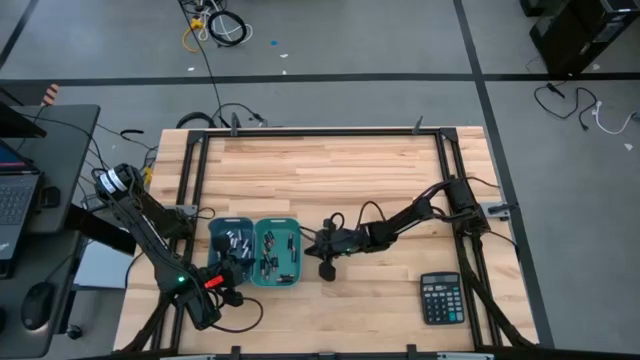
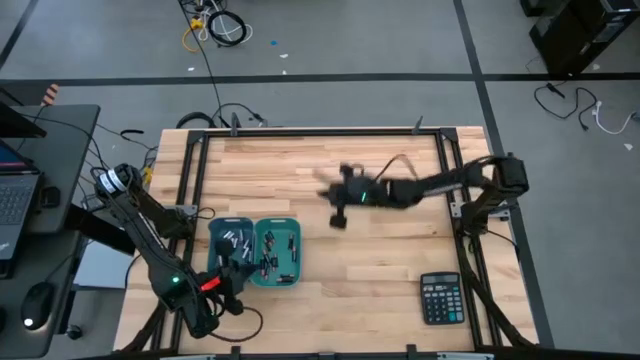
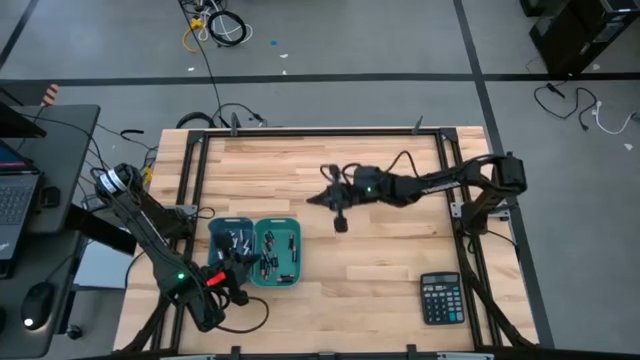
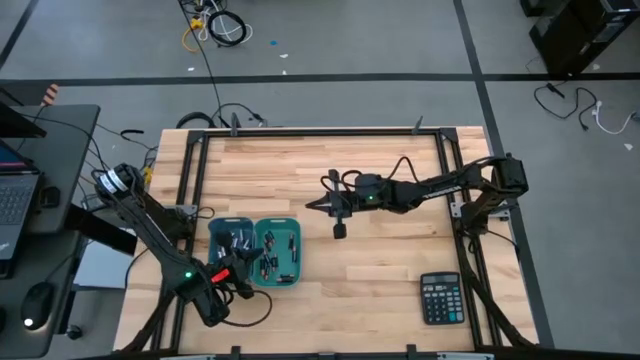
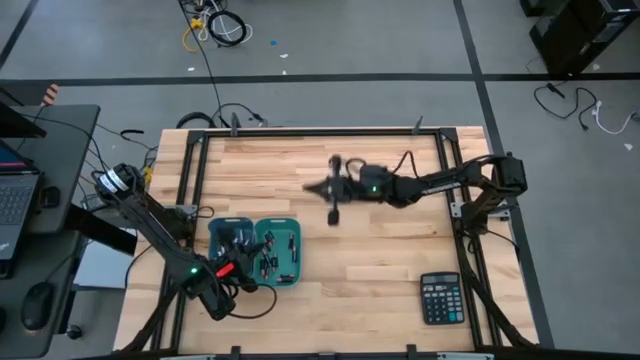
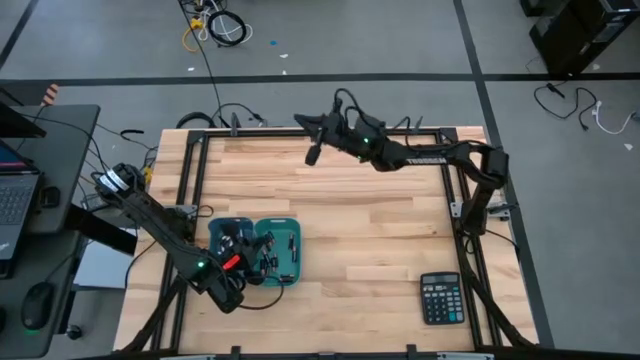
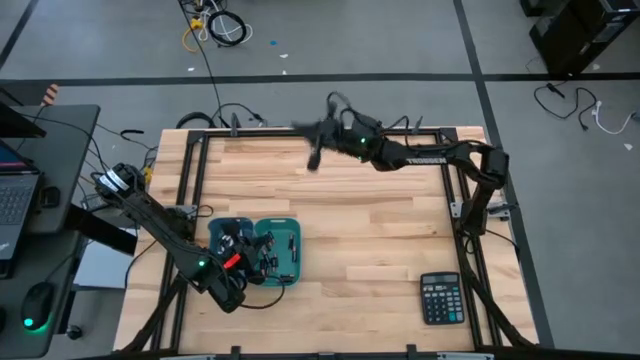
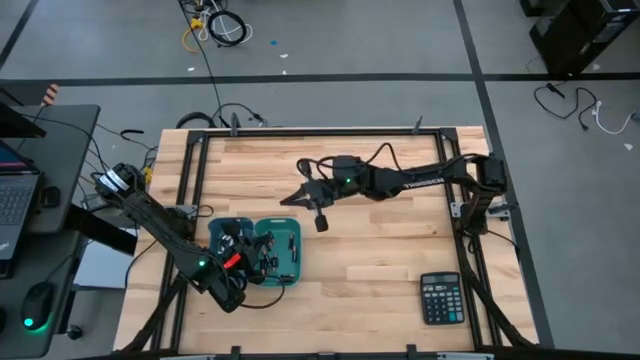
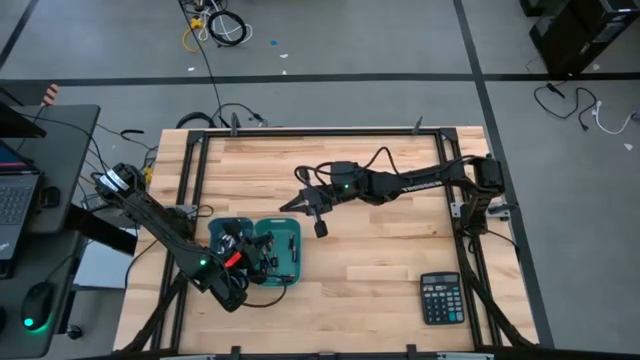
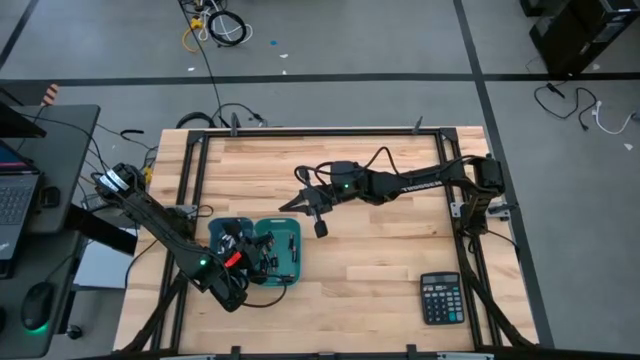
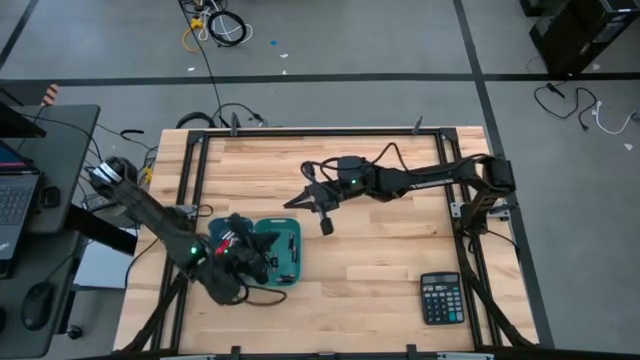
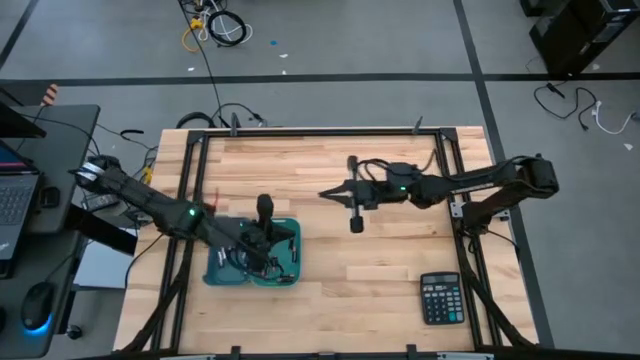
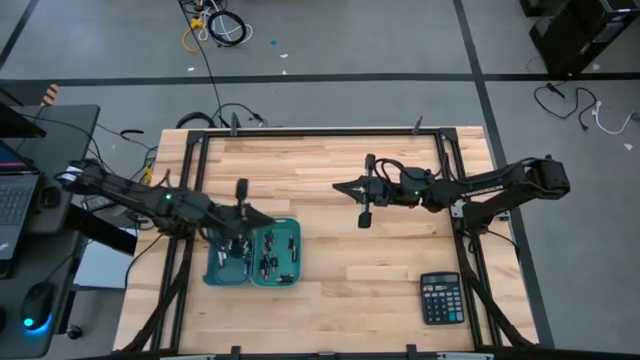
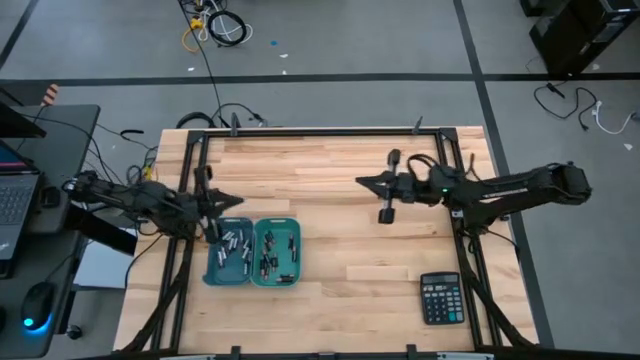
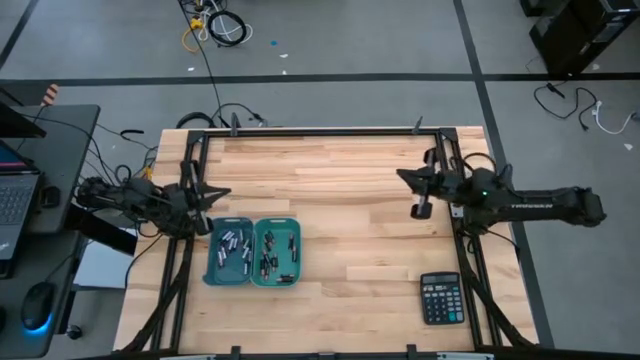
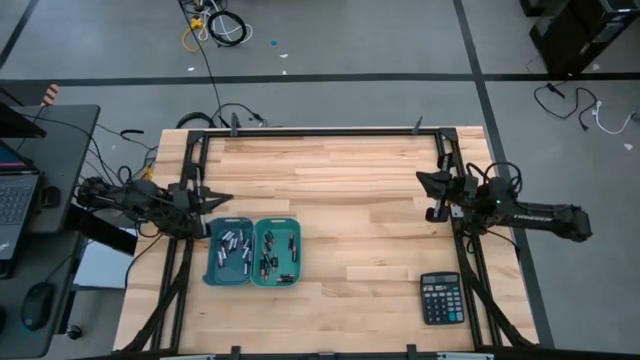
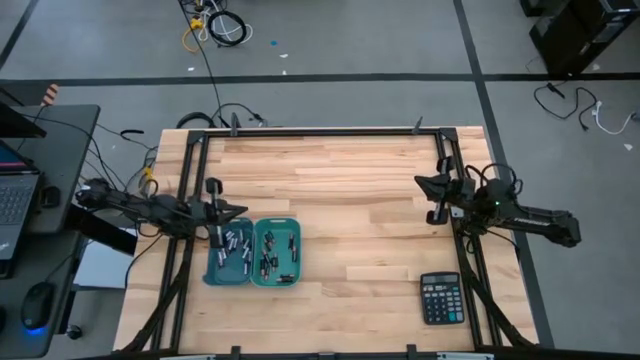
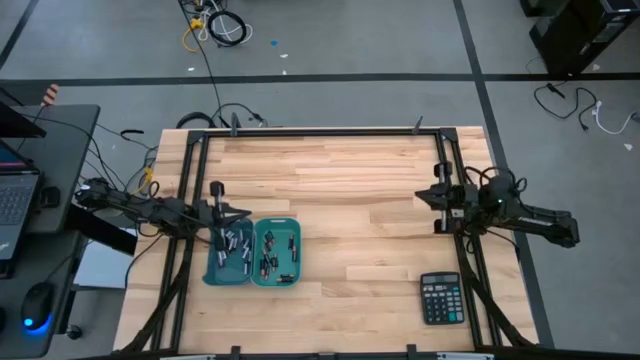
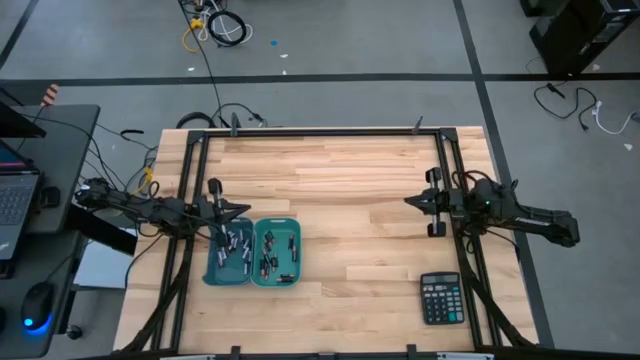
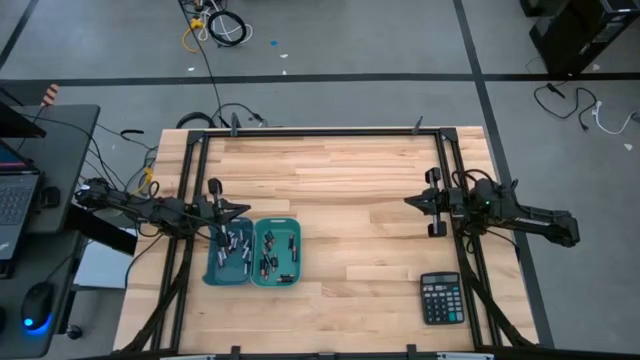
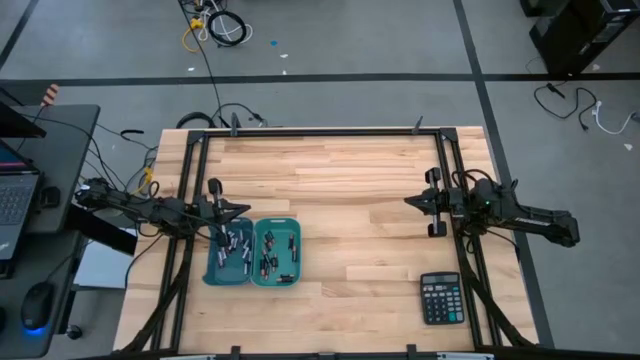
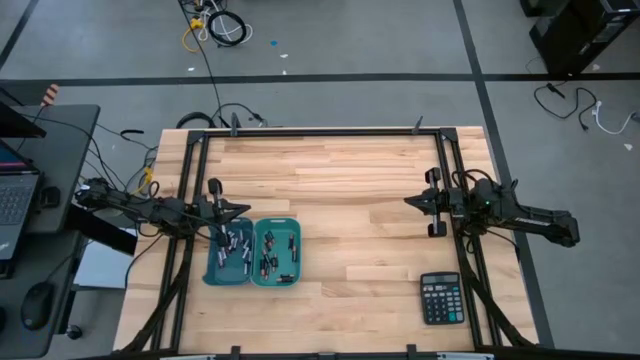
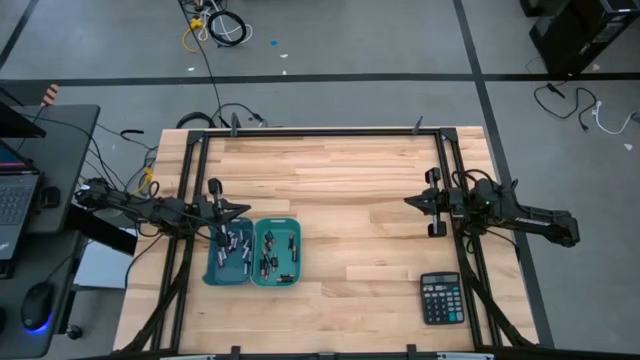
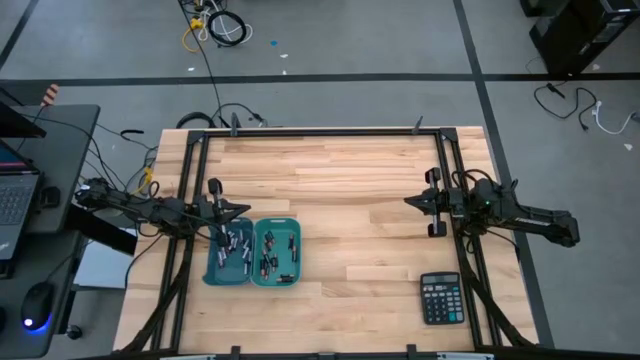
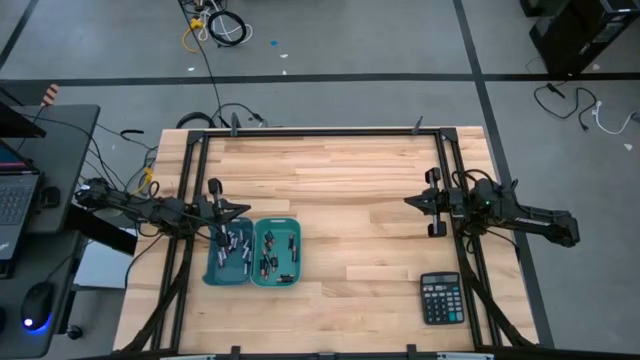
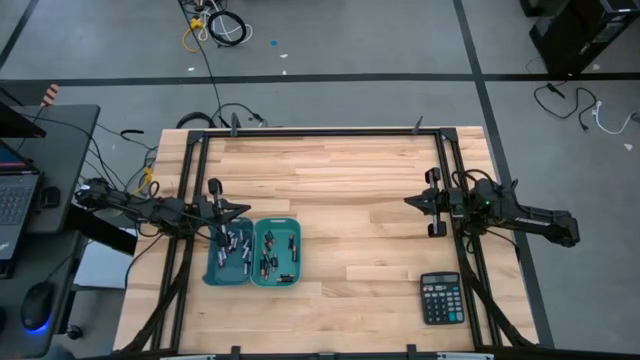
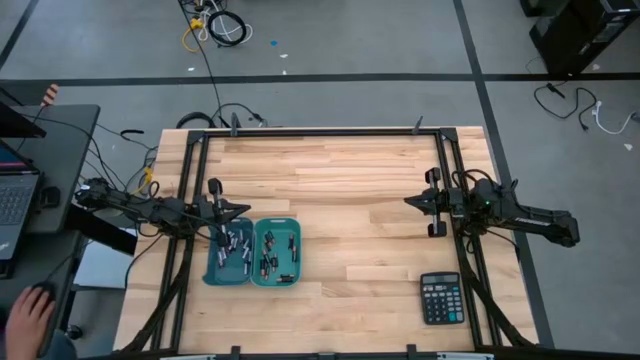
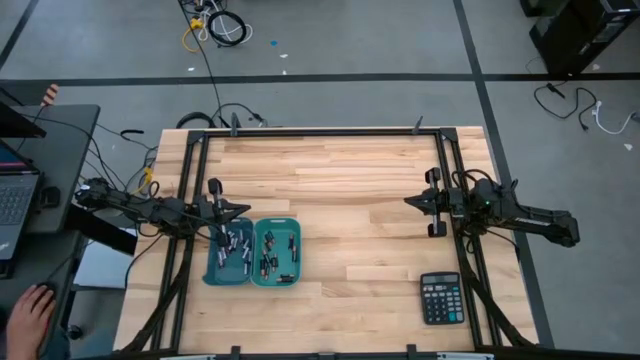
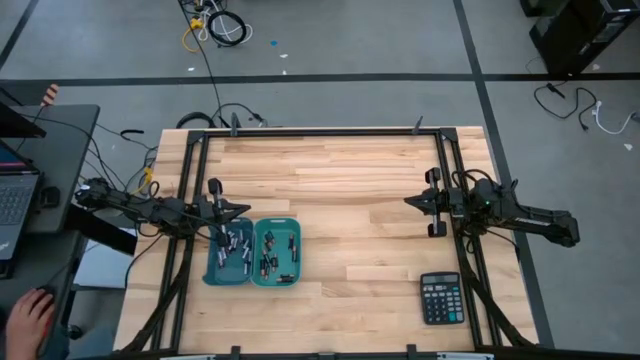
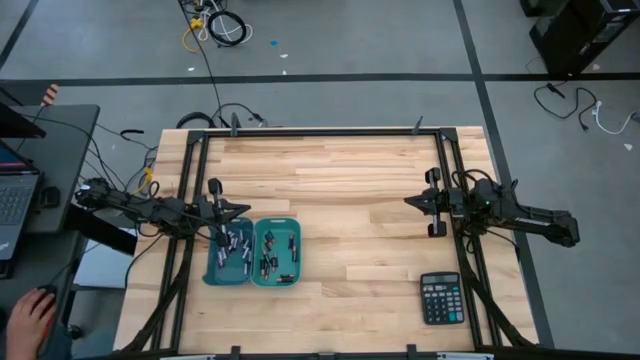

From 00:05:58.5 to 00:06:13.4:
Task: Sort batteries
Return to Home Position

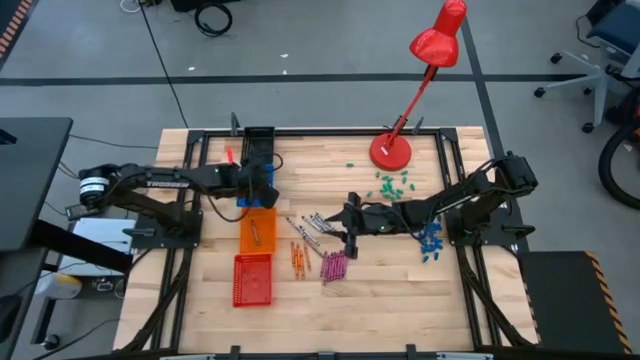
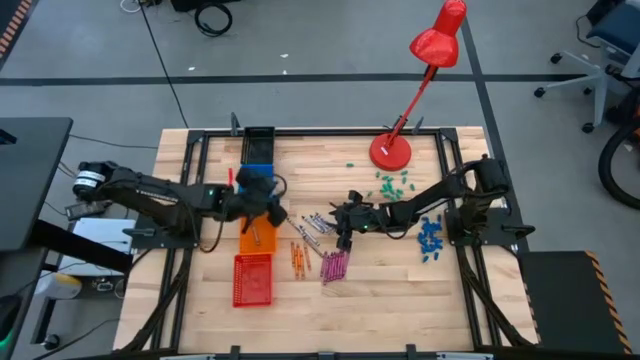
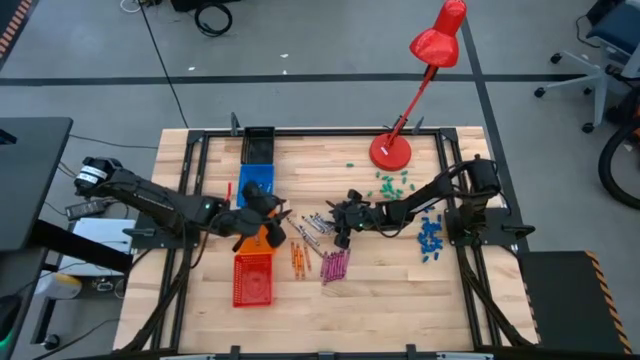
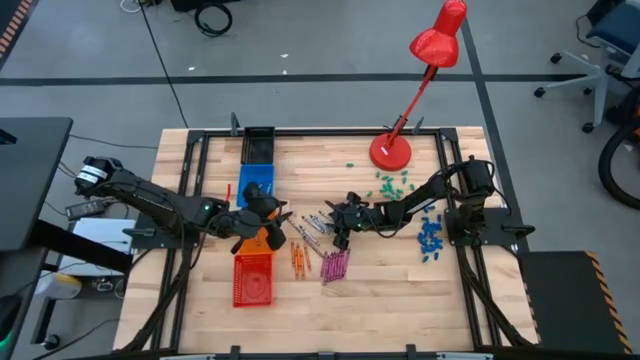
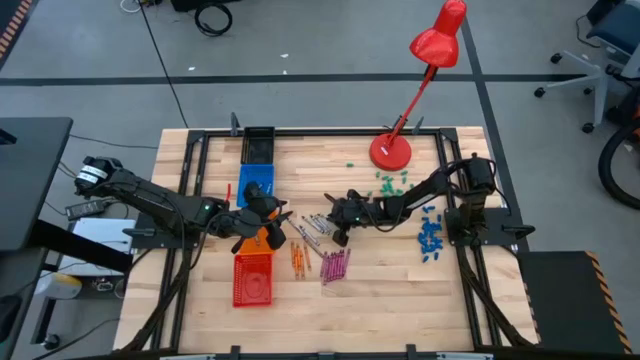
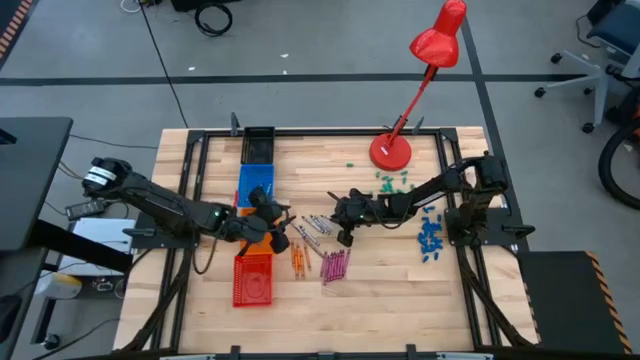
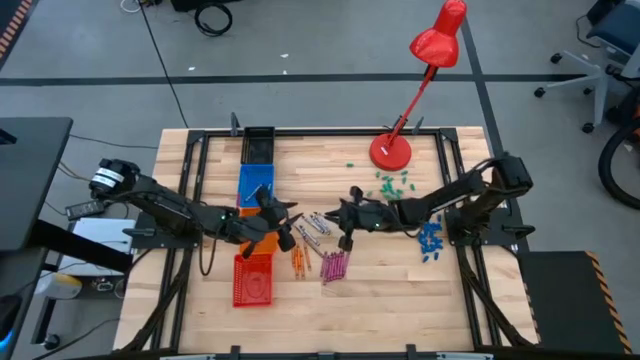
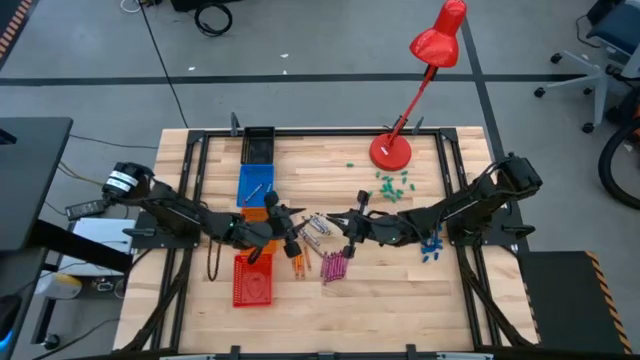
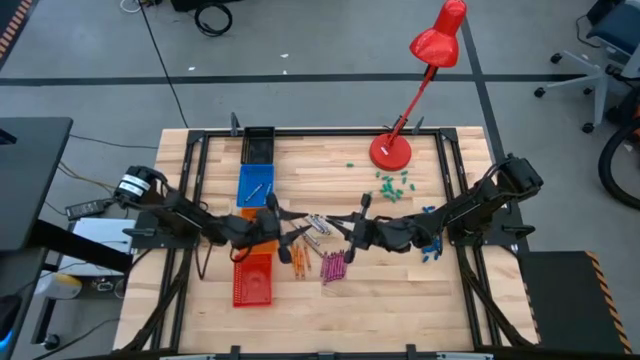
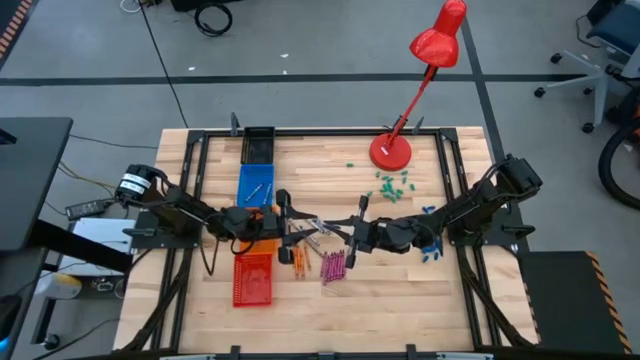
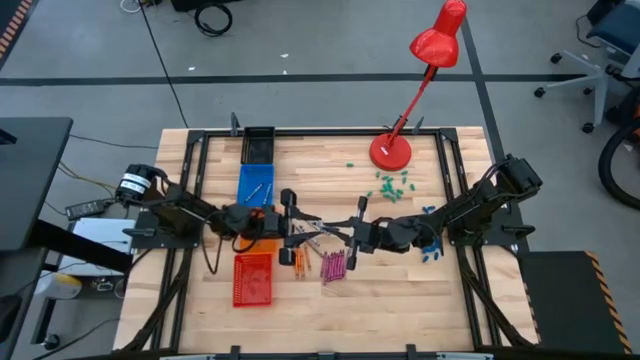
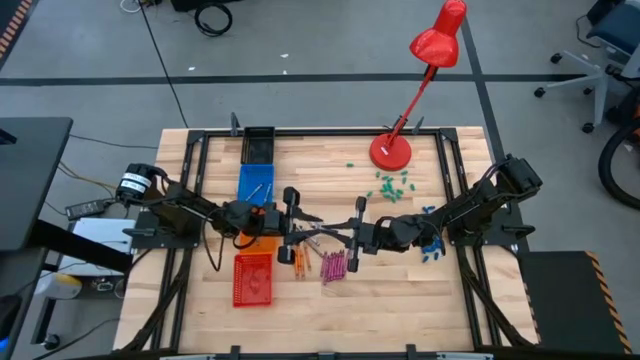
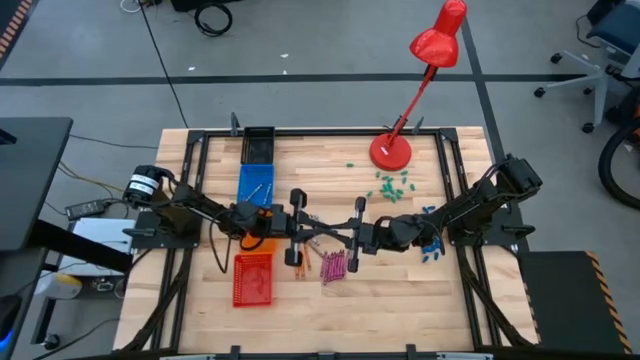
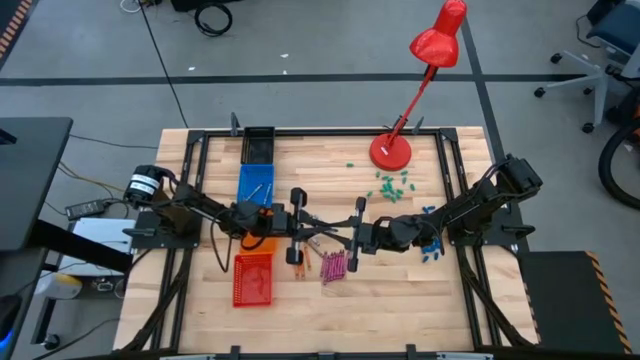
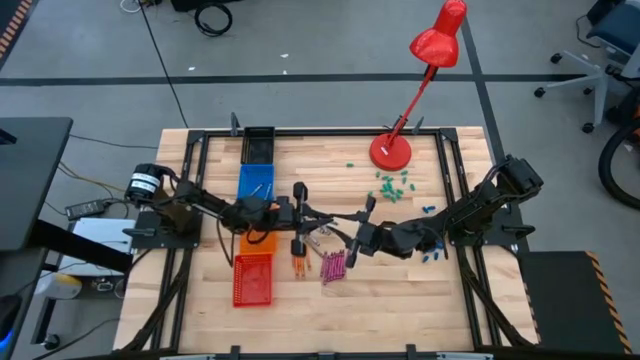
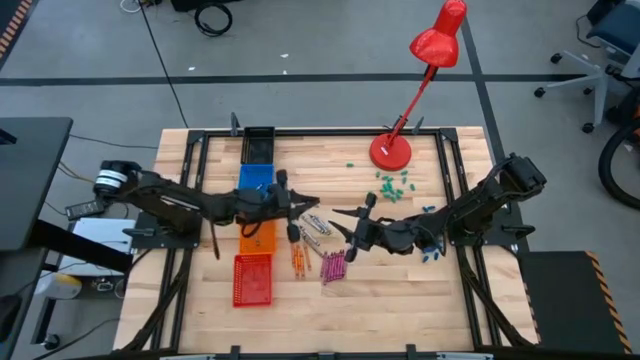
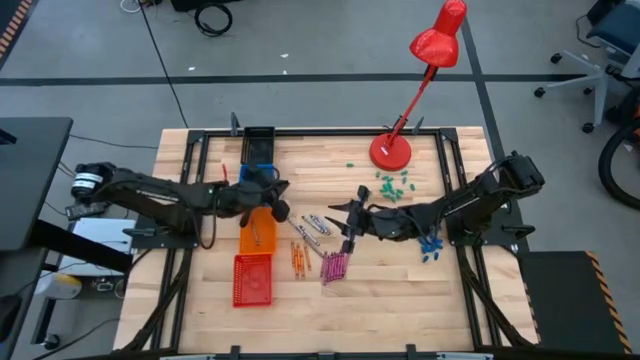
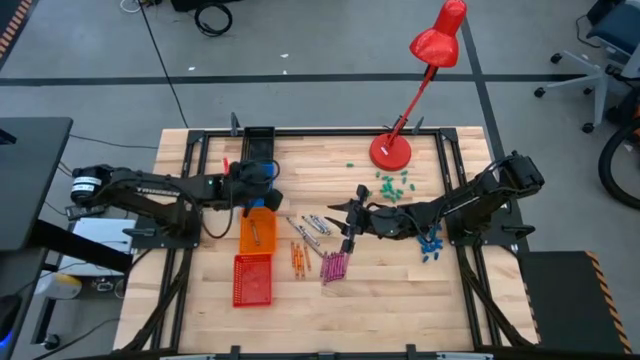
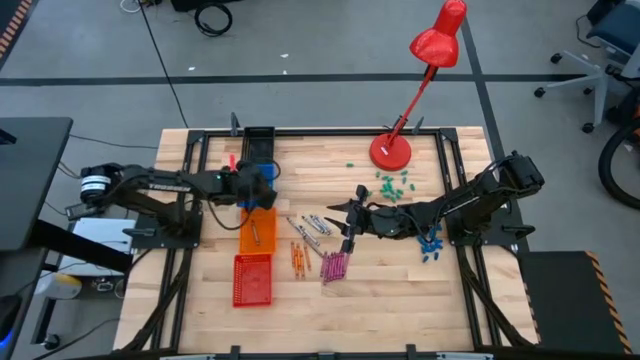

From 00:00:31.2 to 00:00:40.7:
Task: Sort crayons
Put the black crayon into the blue bin
